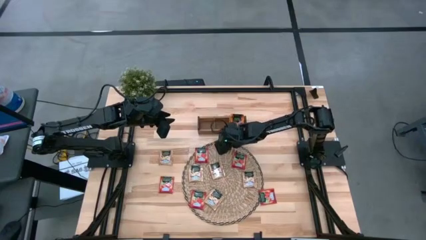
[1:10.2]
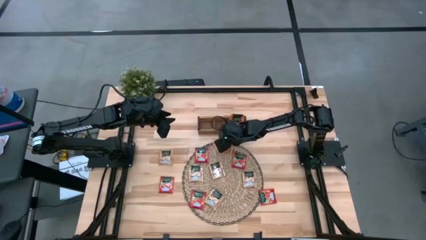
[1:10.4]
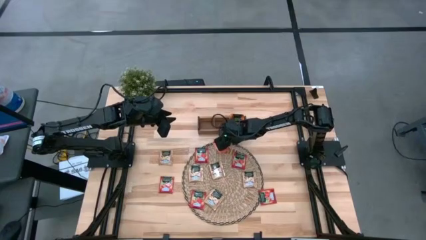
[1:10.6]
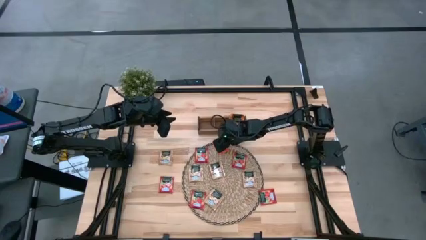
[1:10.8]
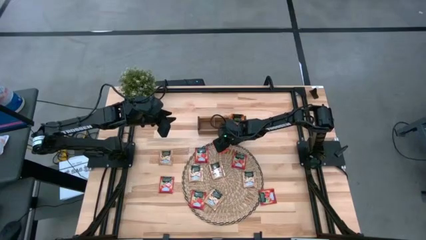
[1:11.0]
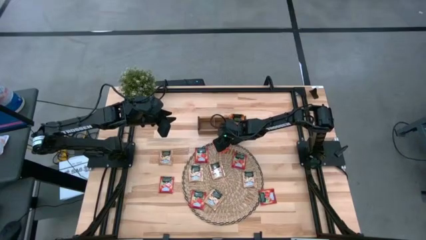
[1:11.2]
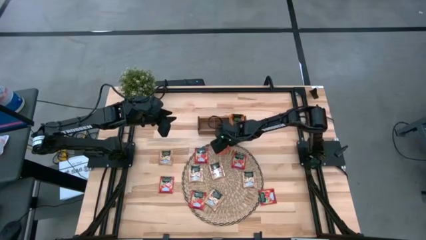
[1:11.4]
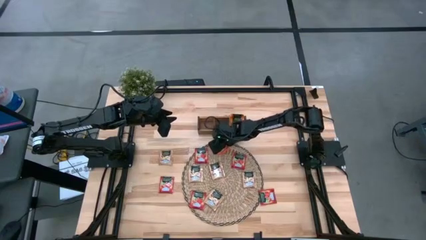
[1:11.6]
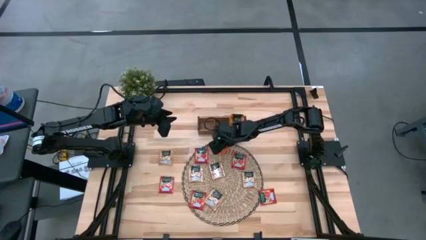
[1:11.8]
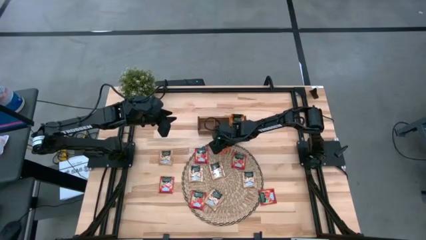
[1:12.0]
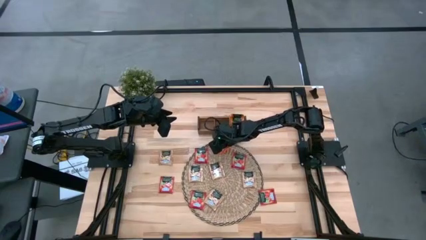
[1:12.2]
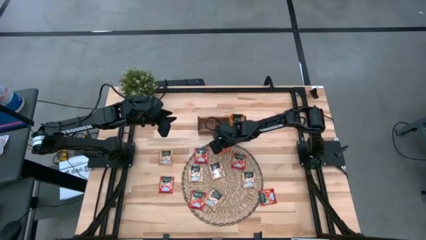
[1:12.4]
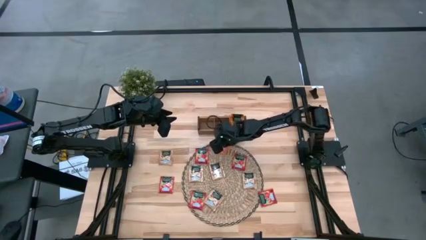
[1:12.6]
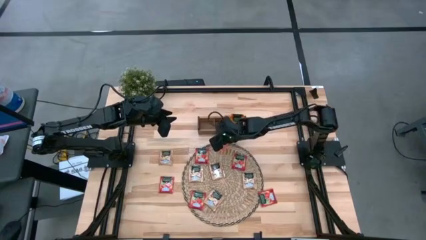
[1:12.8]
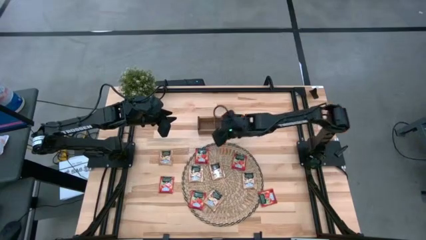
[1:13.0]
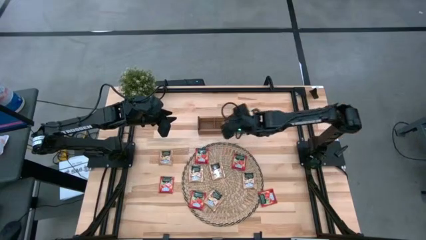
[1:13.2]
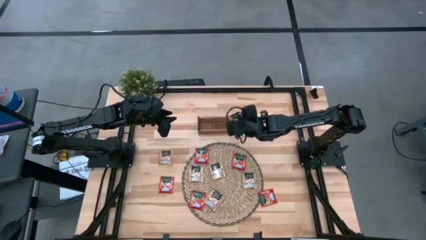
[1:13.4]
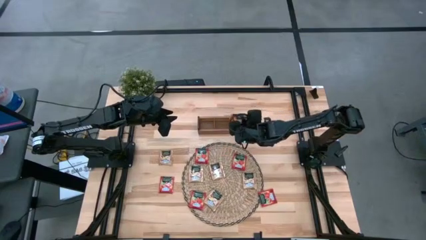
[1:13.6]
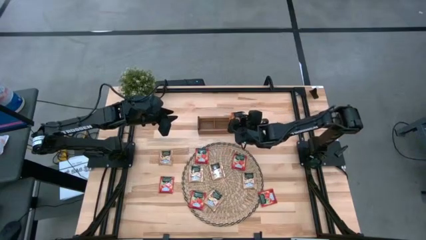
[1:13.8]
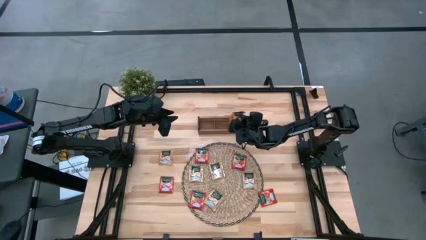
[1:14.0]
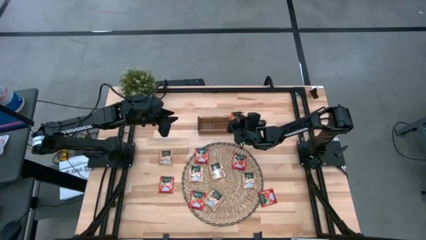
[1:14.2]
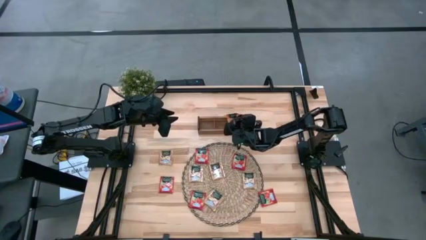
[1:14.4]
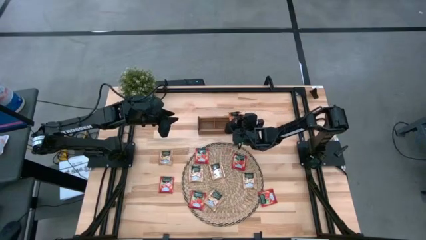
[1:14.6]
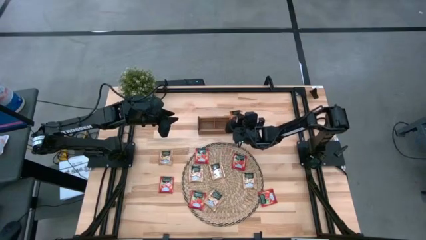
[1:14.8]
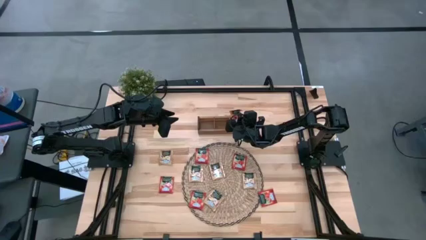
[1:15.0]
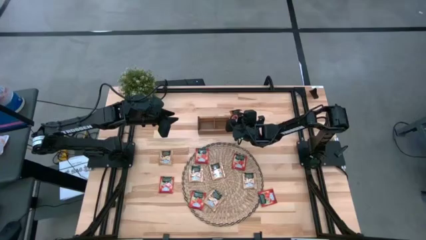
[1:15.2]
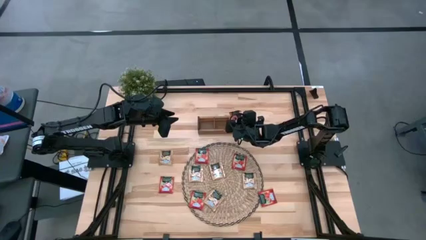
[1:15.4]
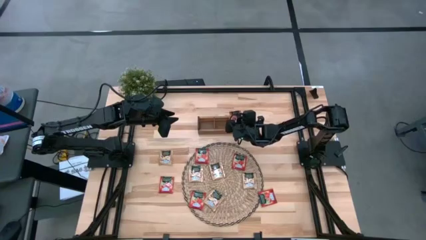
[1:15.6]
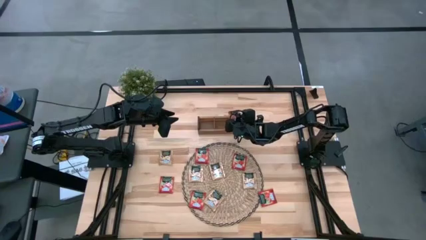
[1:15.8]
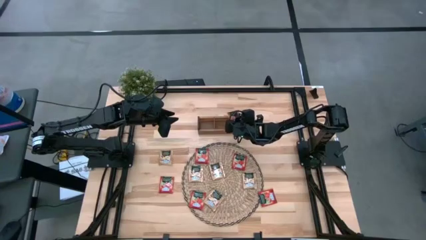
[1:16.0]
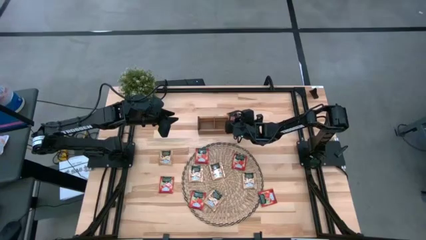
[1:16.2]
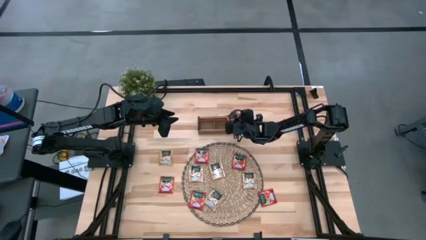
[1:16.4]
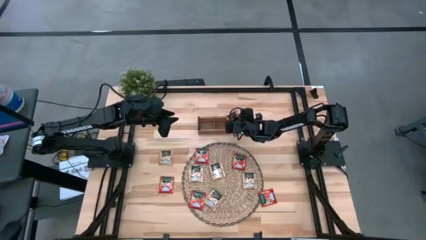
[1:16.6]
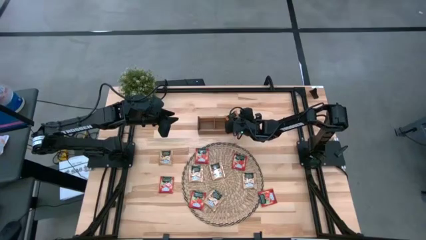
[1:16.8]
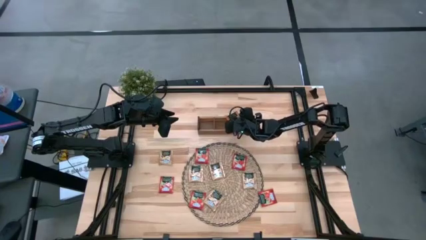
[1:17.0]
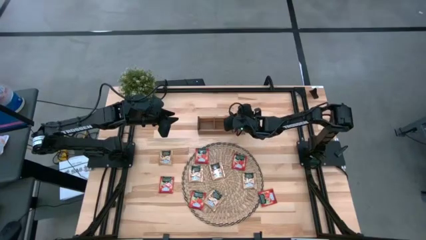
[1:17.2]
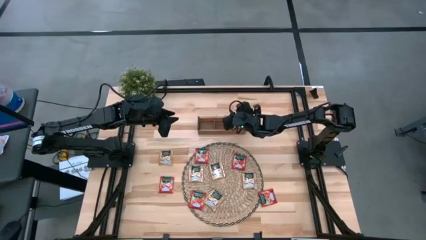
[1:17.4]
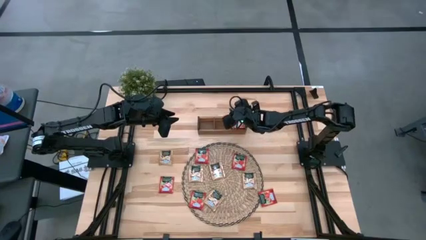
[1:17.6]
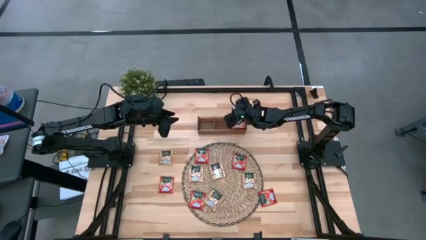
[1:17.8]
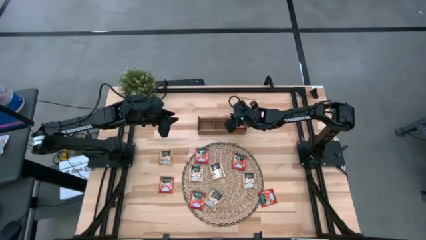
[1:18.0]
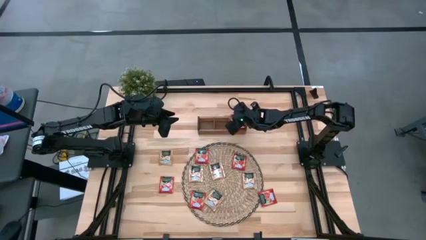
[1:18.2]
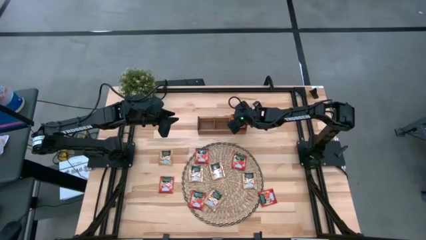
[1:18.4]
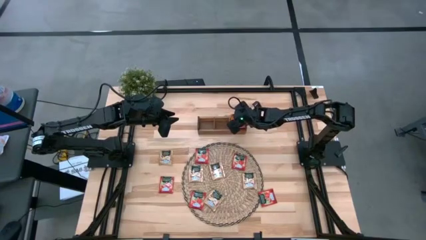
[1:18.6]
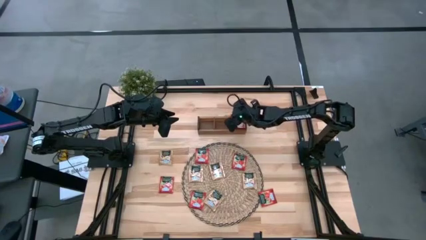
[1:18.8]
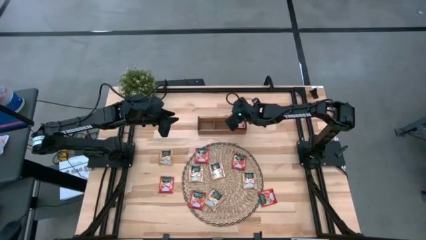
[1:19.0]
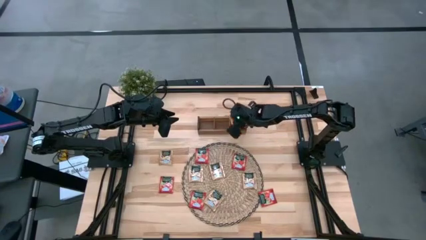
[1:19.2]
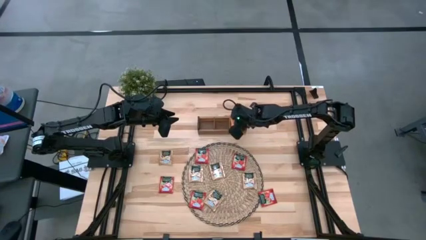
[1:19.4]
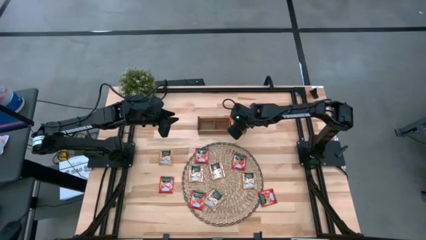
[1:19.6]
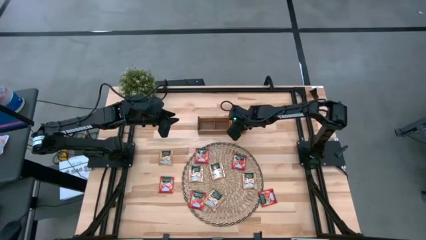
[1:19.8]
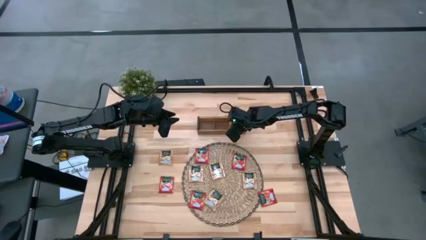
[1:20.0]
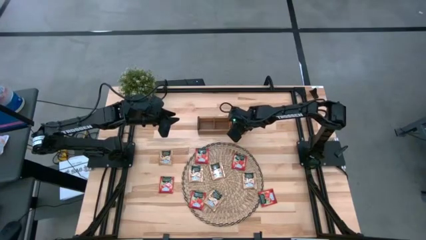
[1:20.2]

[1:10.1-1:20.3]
Task: Pick & Place Tea
Put the orange tea bag to the right of the wooden organizer

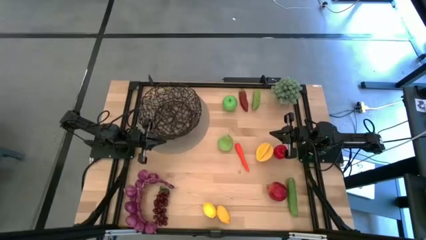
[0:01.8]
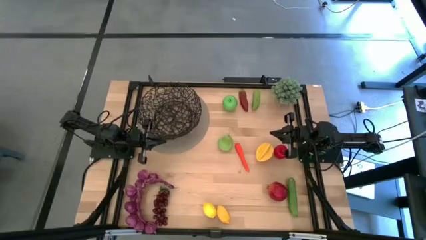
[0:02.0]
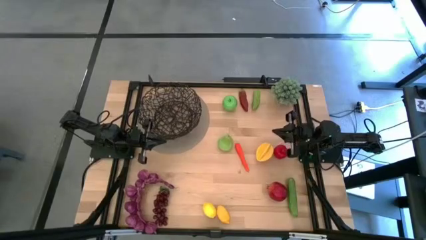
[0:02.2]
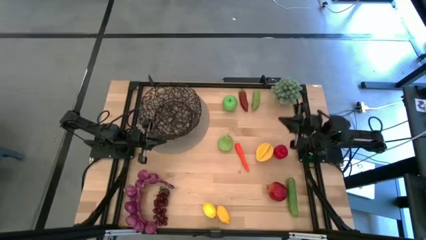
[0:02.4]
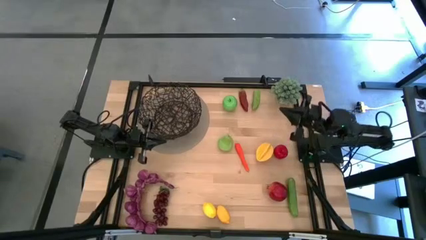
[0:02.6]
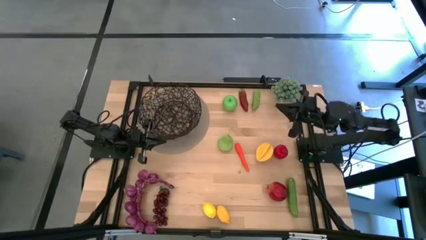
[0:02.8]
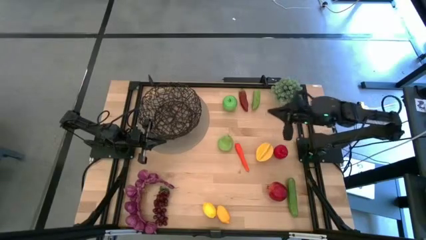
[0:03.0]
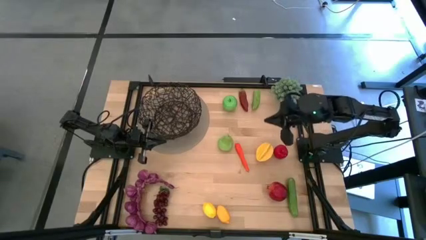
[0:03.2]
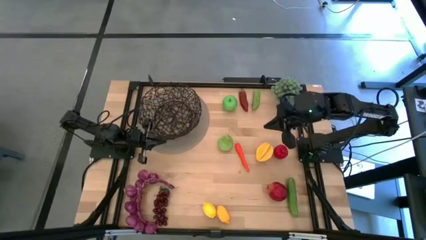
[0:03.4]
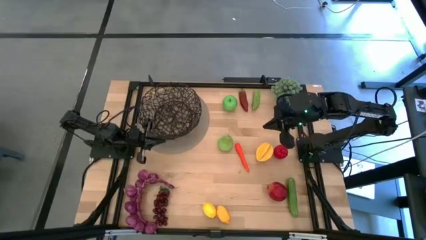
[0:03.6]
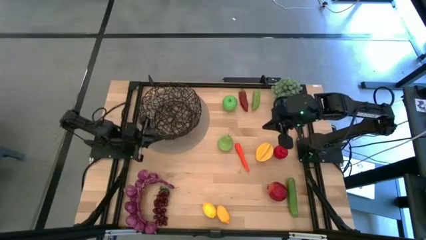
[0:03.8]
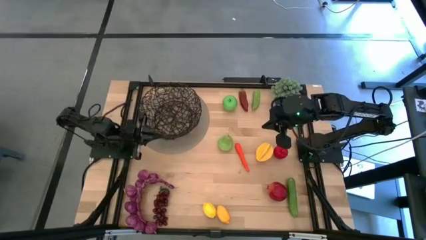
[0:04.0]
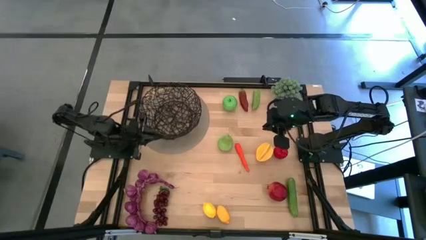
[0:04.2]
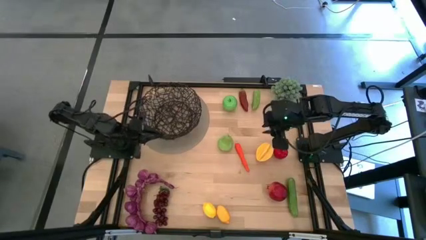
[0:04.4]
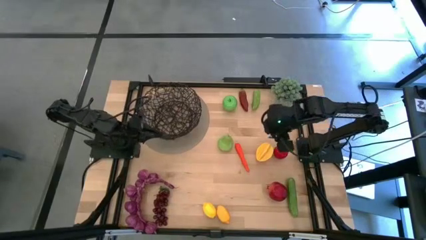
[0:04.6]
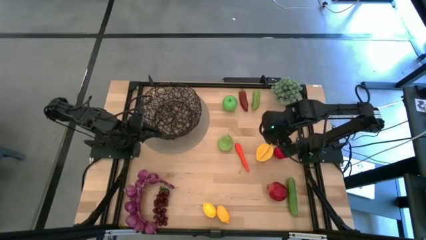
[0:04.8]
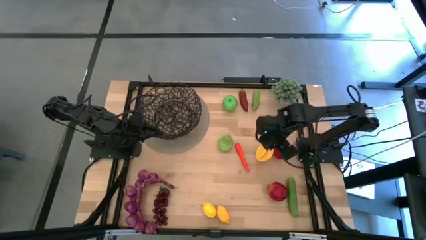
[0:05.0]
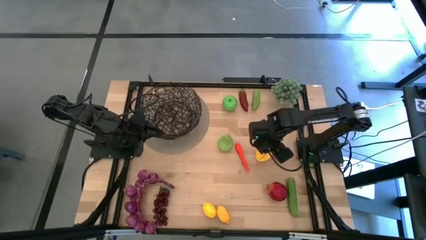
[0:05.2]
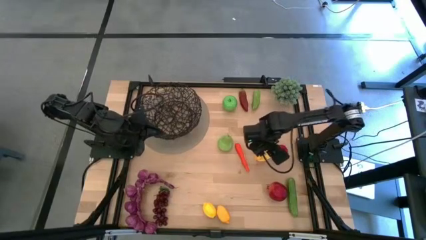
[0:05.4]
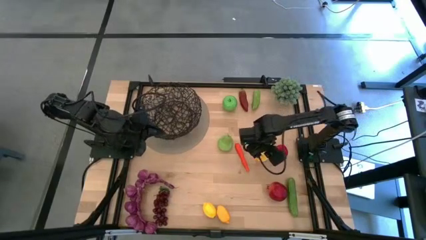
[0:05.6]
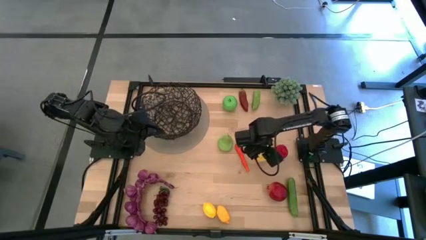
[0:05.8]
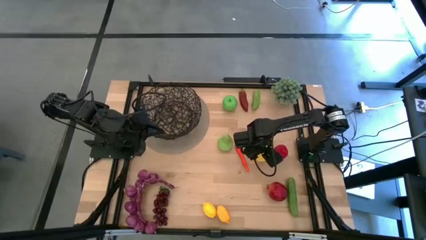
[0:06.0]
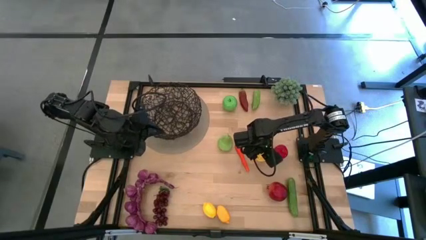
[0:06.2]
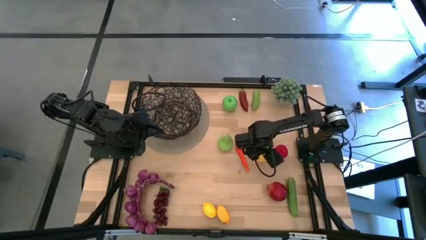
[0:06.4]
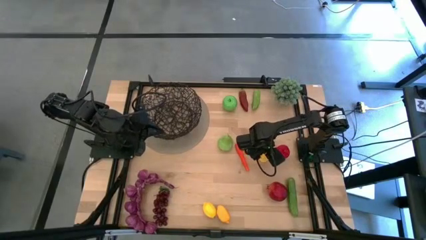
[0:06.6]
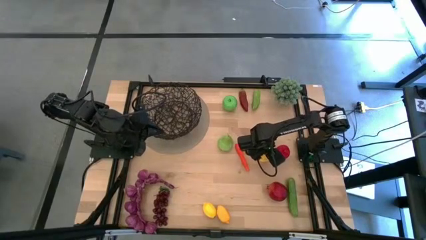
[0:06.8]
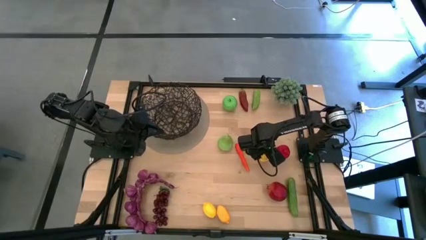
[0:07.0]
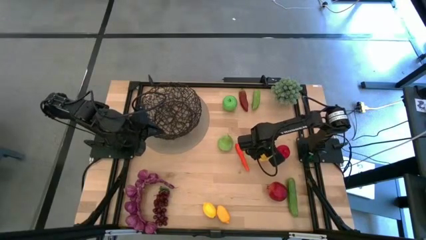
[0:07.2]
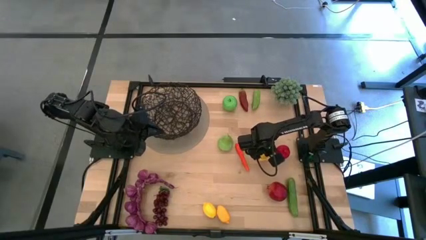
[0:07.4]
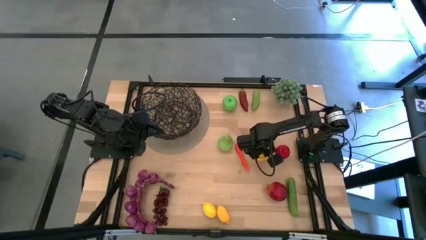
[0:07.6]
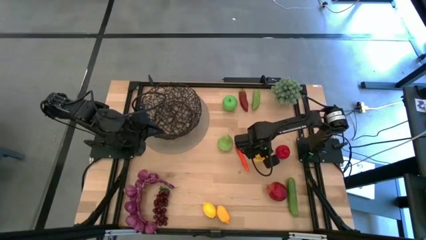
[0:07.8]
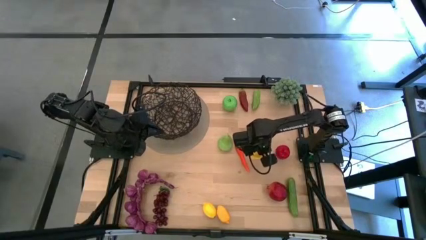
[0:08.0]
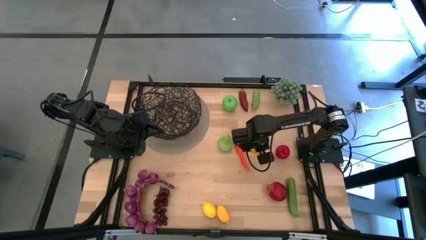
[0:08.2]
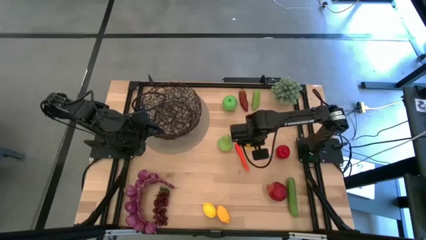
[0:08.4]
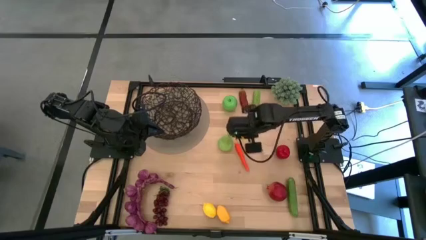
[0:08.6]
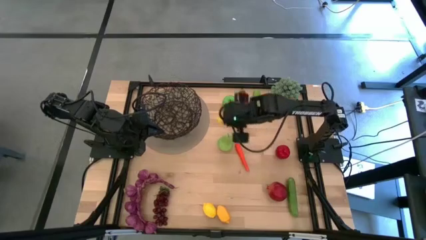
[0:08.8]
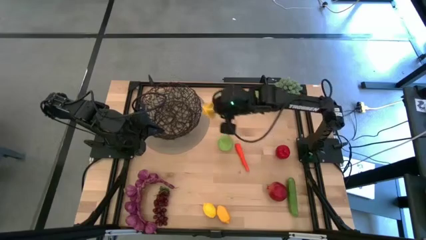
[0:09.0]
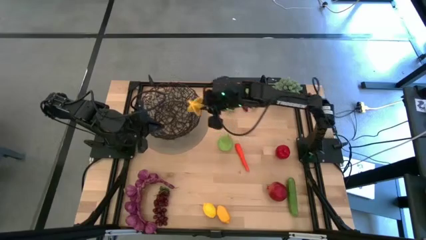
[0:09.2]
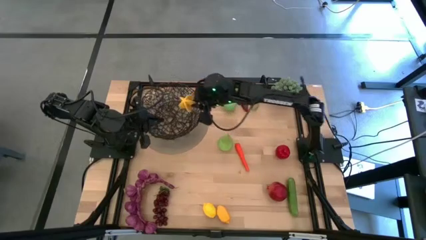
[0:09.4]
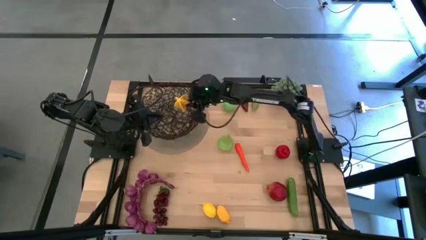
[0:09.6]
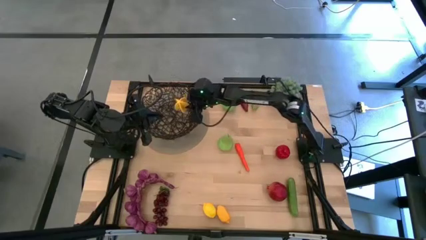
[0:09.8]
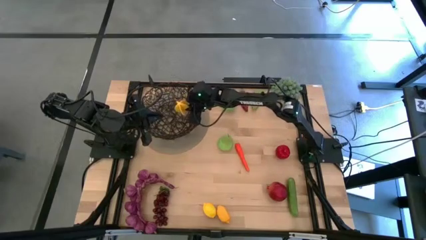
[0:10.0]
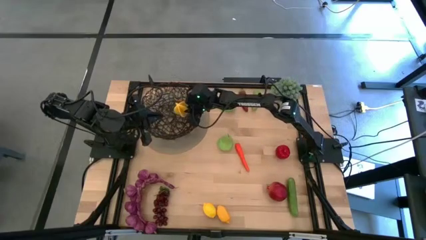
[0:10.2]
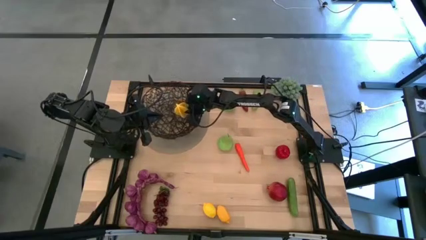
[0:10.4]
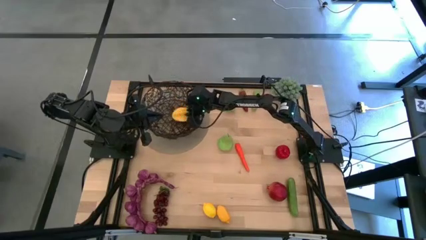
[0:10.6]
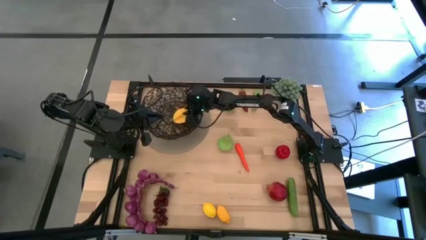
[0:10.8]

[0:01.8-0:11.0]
Task: Build produce basket
Put the yellow starfruit into the black wire basket
